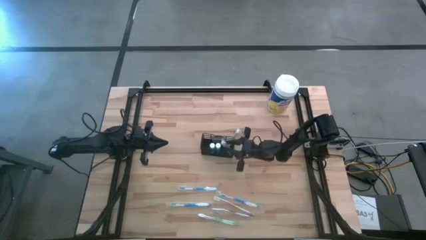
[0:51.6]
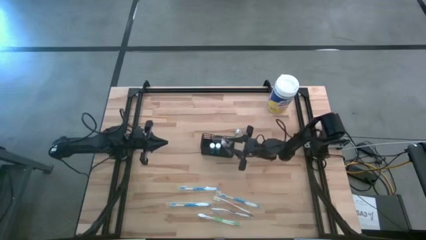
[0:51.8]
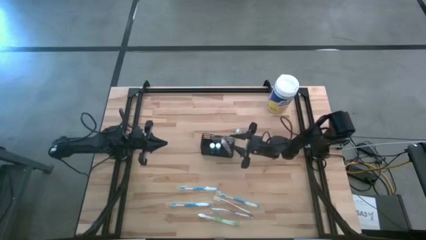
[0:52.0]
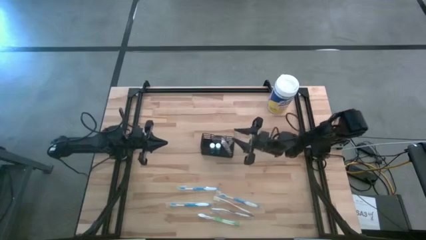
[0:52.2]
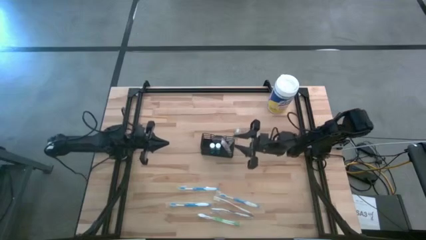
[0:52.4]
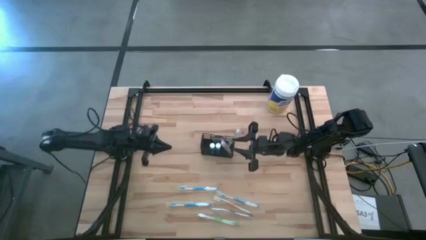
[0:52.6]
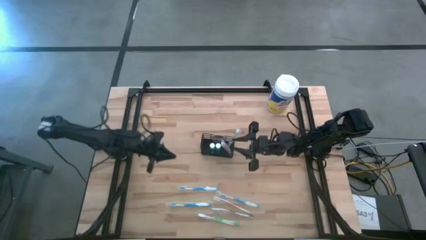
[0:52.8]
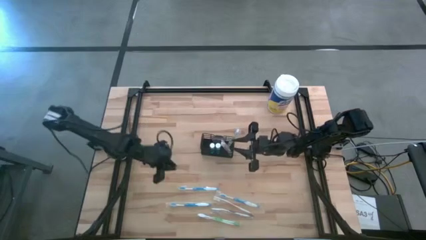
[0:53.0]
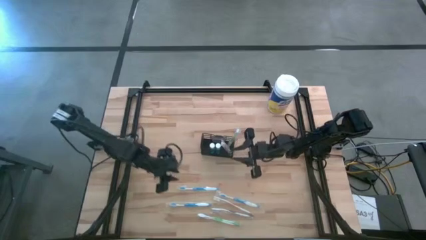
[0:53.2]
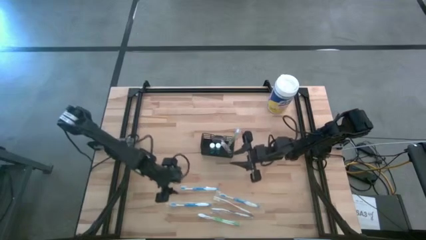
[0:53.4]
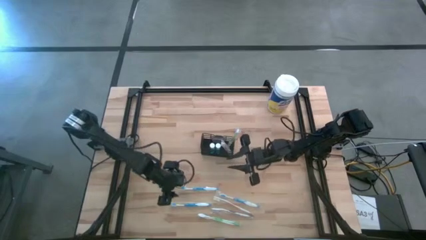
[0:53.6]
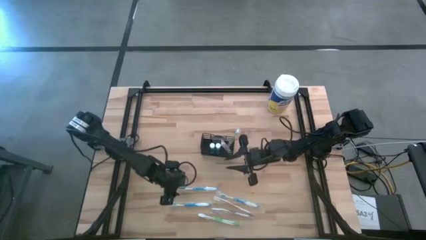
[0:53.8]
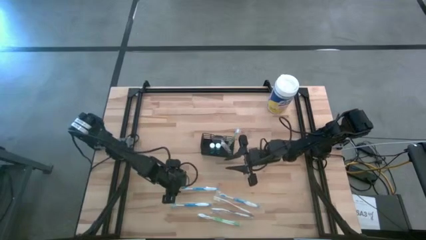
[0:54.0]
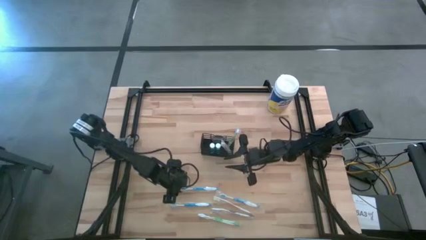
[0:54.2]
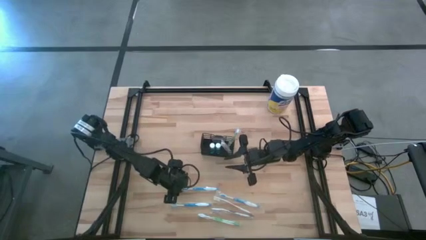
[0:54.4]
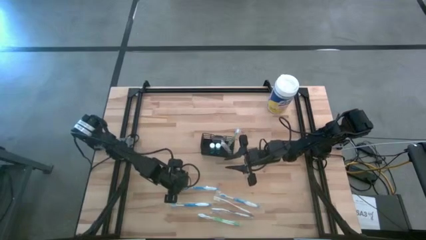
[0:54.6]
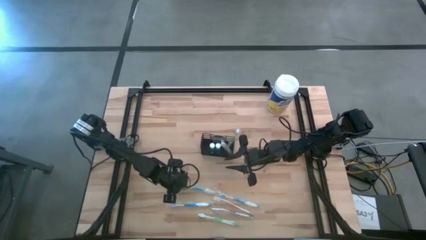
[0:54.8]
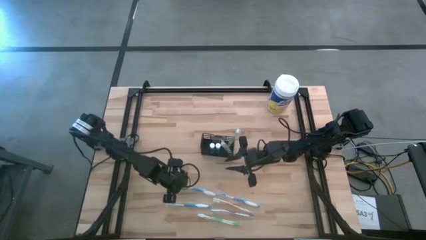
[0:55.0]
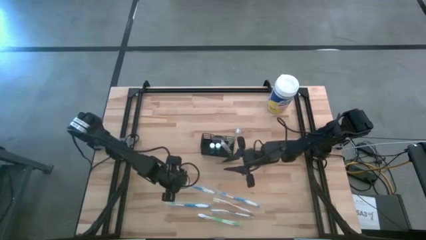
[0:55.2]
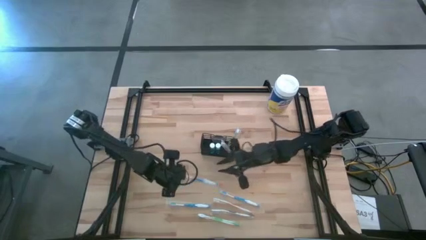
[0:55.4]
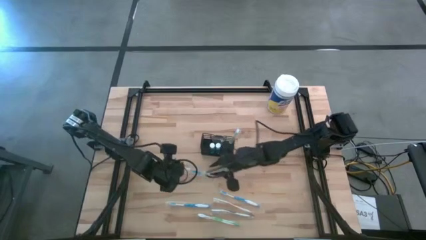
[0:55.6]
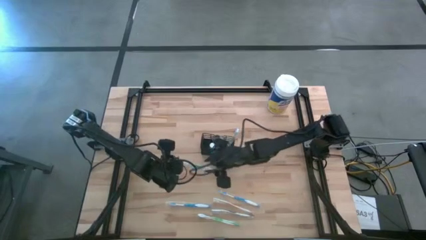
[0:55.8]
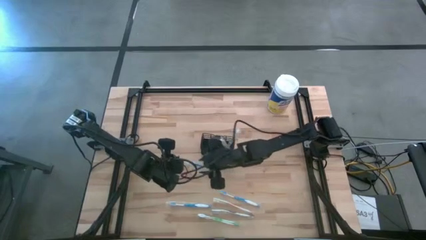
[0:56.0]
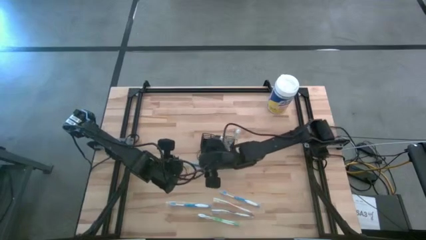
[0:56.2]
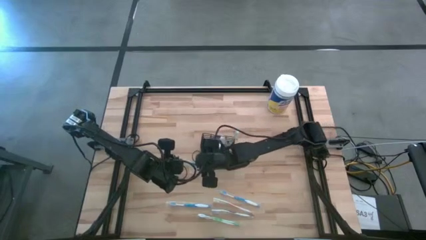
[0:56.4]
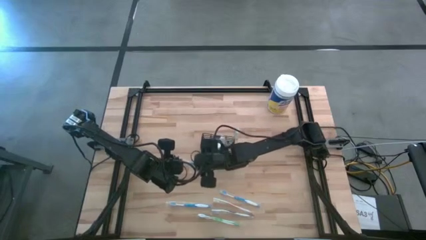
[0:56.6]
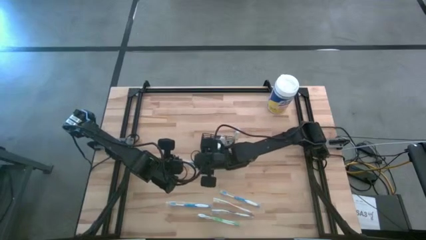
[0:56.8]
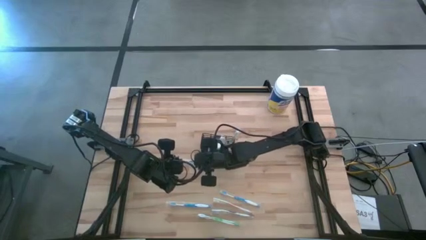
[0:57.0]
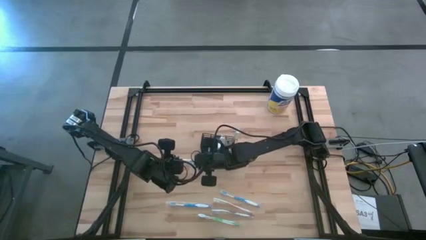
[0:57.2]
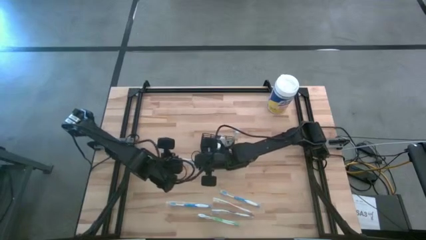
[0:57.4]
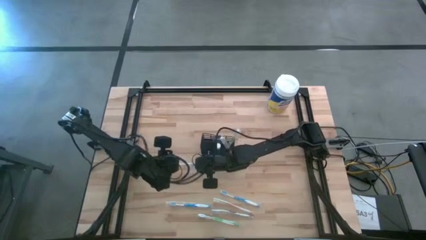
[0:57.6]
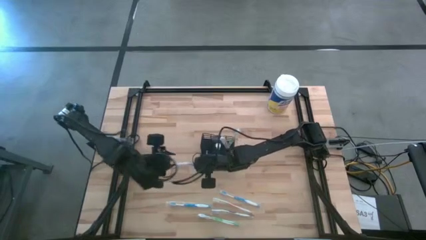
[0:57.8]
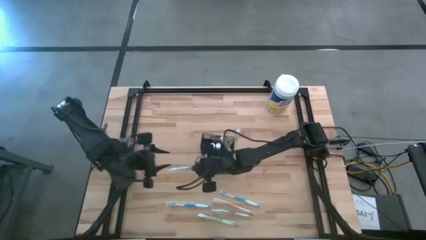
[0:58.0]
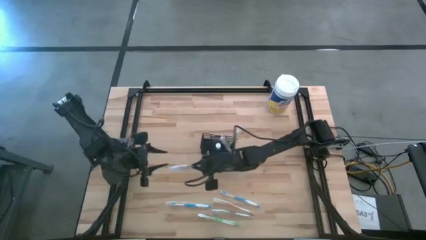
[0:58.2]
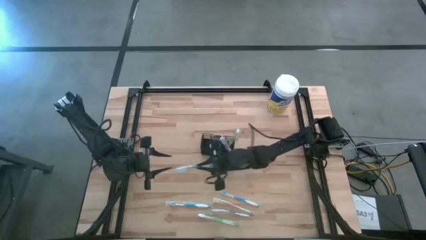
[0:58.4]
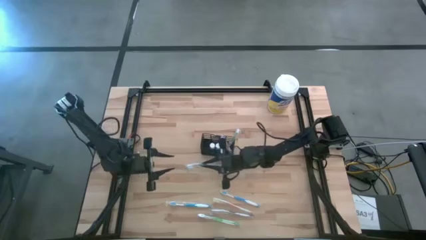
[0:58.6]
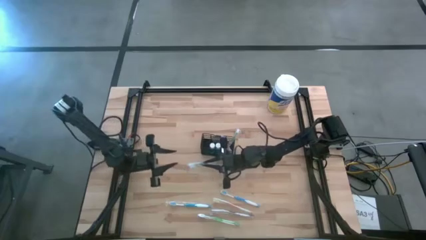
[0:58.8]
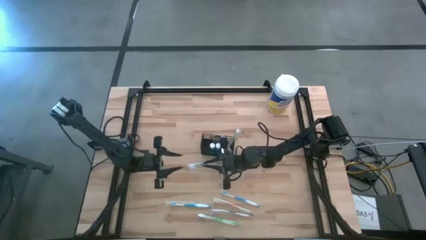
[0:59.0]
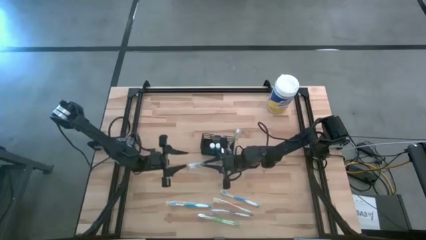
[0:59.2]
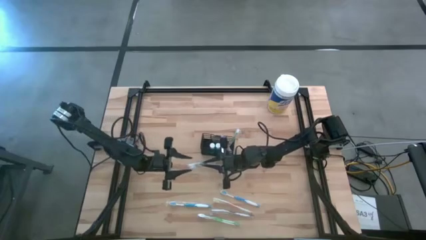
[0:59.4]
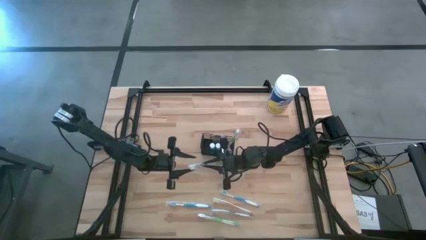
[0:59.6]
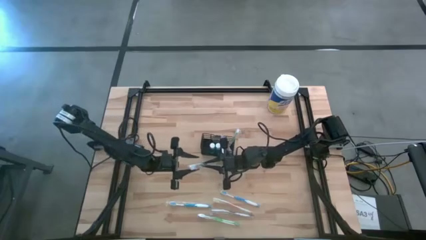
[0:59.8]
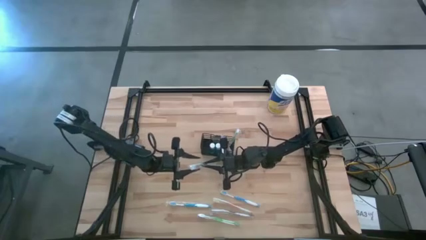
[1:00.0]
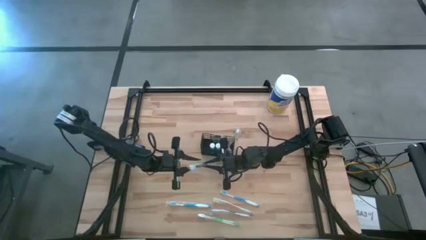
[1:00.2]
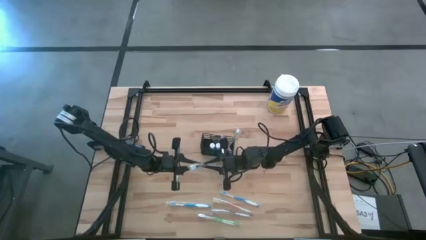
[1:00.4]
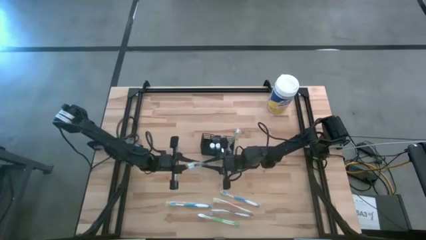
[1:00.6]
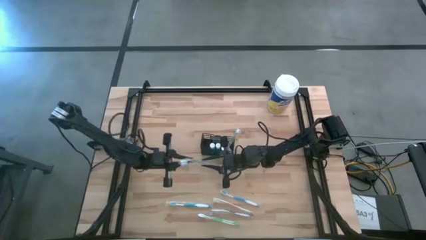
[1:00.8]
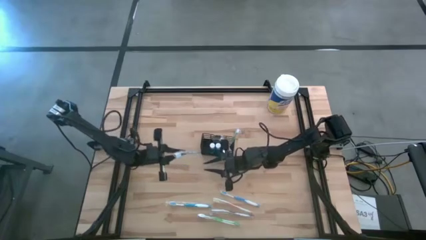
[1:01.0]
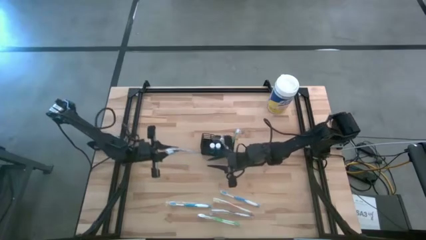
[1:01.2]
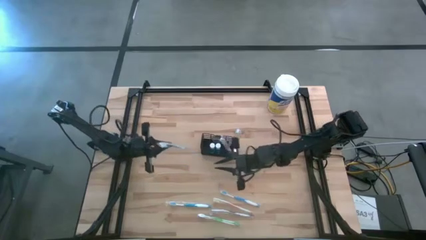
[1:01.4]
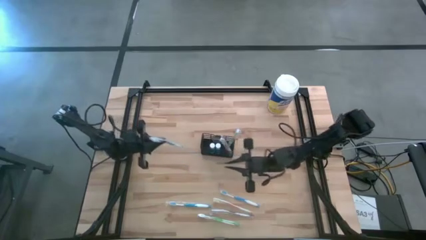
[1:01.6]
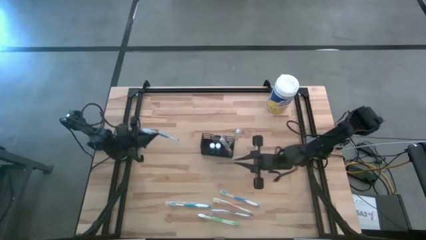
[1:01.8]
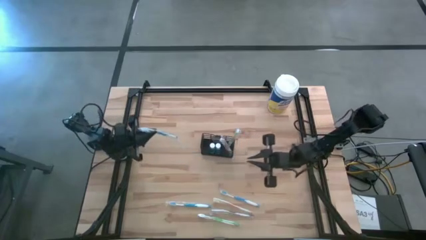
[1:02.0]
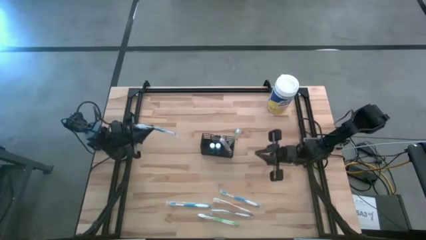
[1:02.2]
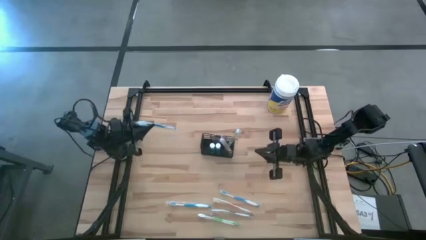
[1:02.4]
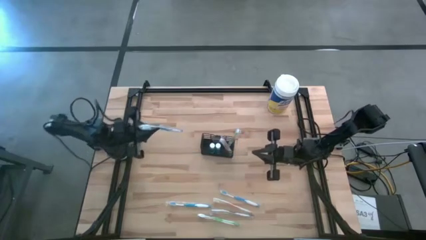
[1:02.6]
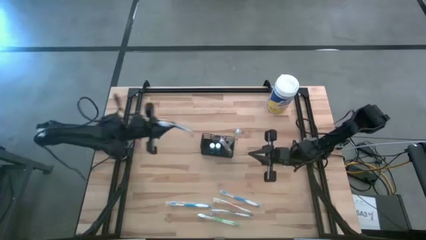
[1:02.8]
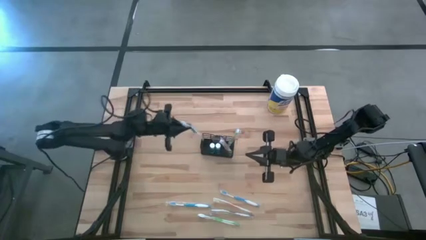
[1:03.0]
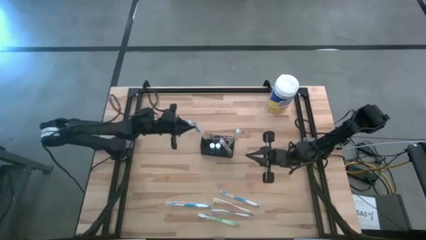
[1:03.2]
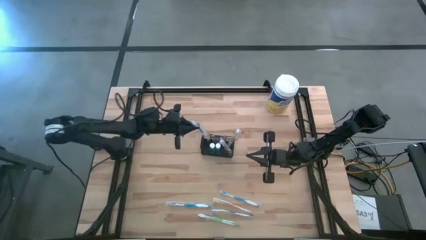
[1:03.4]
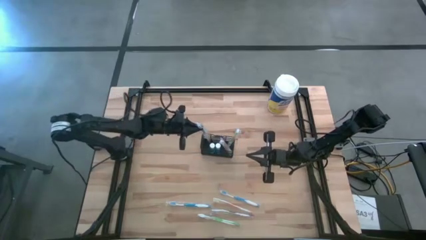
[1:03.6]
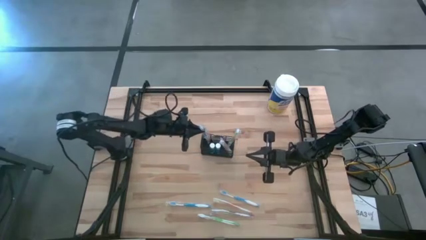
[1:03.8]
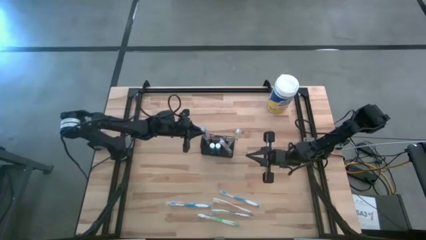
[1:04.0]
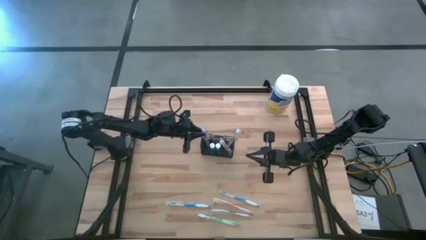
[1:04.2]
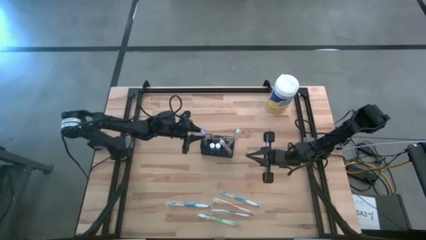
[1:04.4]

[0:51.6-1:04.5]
Task: Pick & Place toothbrushing station
Put the top left blue toothbrush into the wire organizer

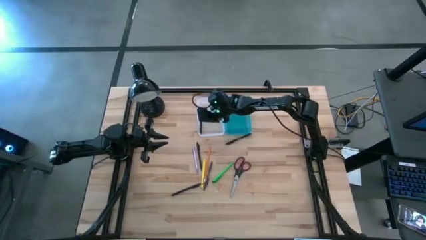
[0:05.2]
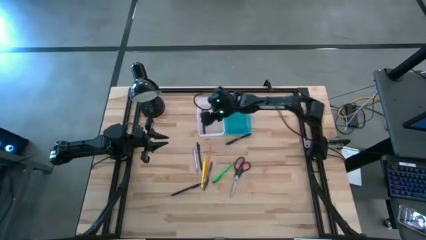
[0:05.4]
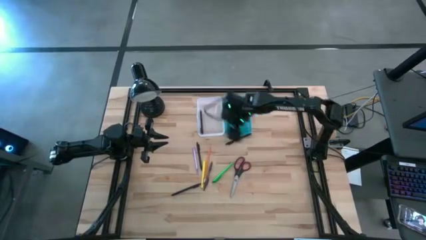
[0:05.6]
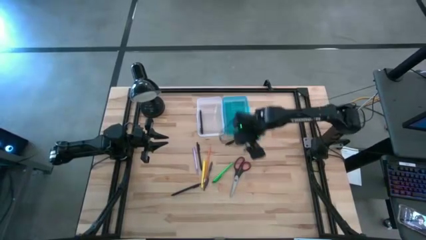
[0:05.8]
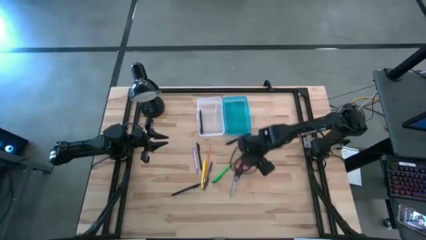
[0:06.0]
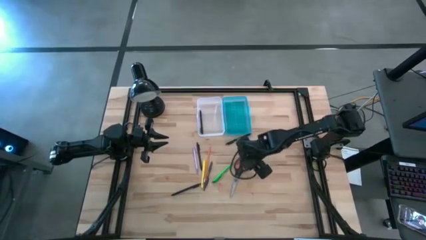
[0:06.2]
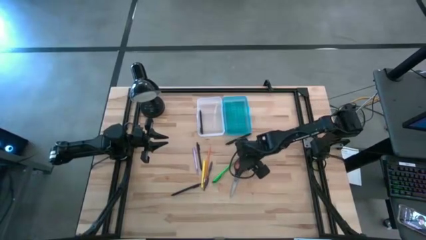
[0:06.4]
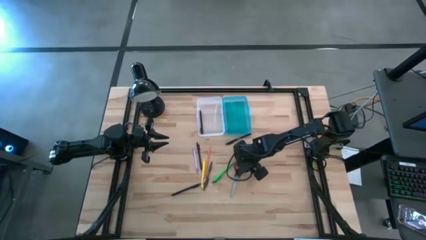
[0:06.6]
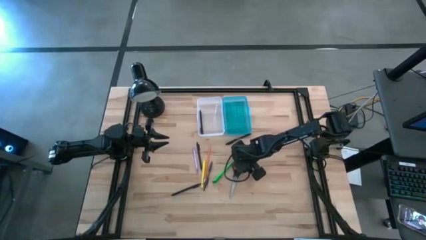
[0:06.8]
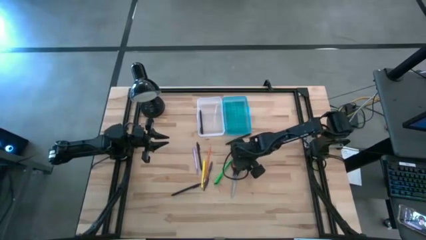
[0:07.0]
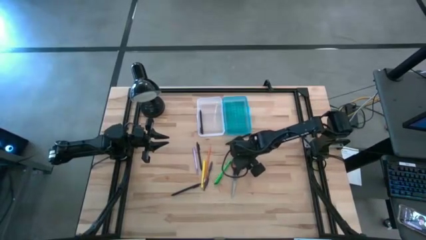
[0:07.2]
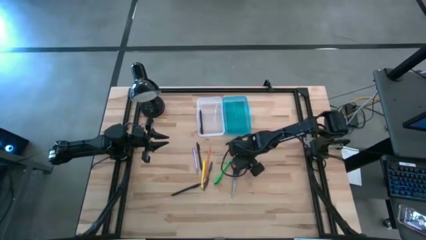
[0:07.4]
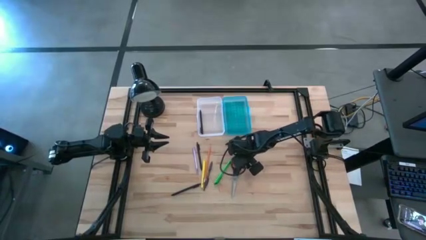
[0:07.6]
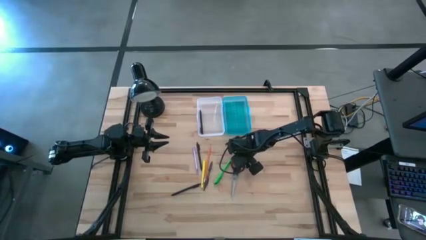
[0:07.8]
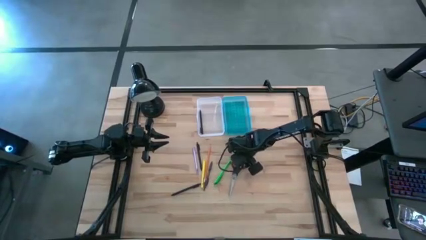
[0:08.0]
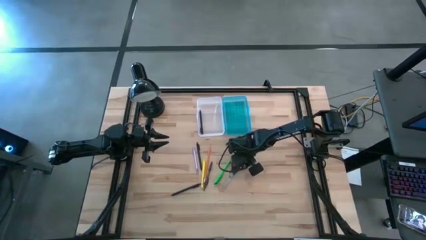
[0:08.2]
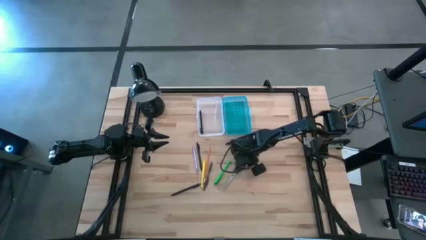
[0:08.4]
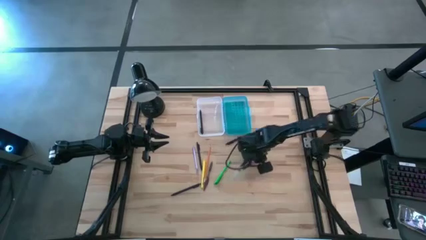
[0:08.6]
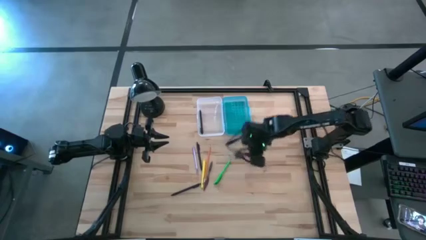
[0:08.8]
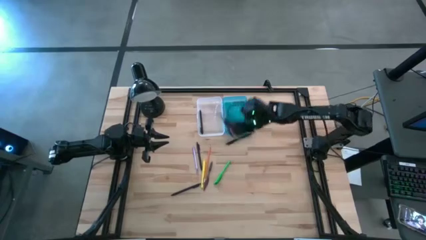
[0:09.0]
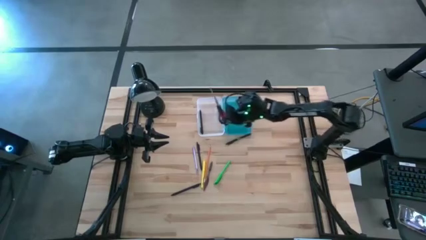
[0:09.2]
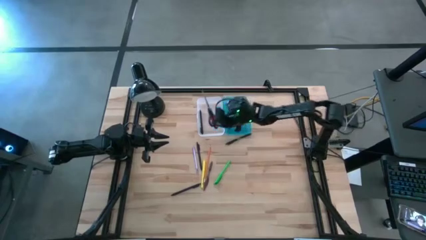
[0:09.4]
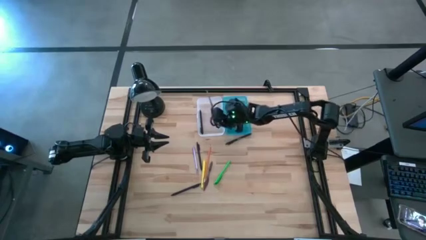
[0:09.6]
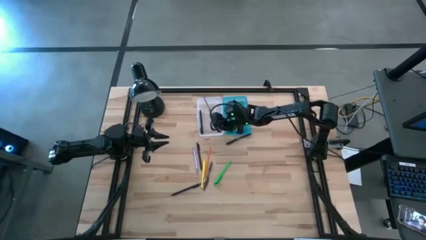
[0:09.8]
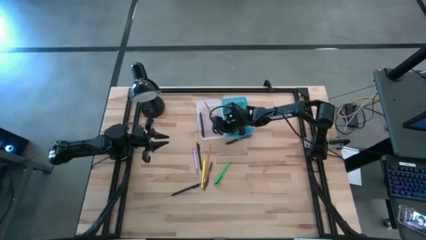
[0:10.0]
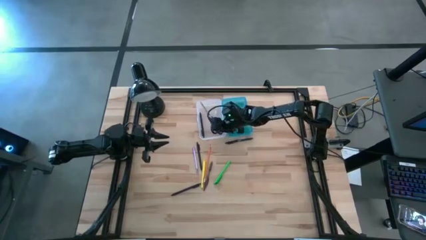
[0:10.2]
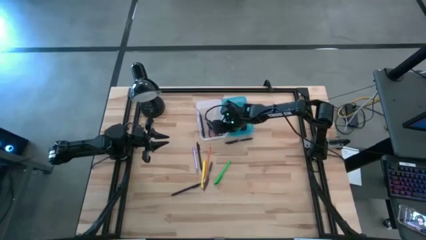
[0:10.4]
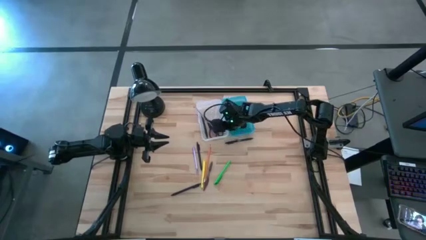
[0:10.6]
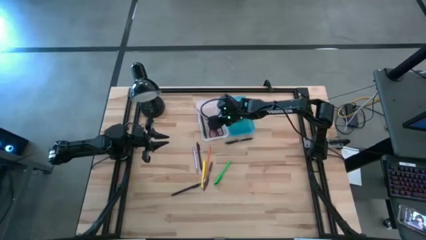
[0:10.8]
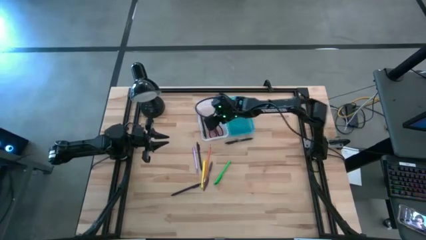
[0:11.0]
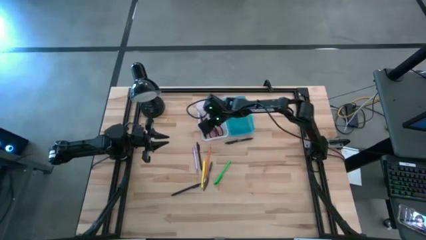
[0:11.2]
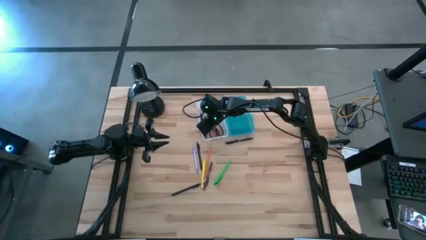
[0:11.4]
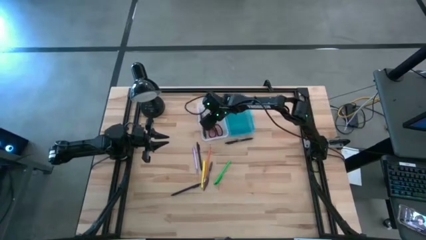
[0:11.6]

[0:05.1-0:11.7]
Task: Pick & place school supplies into a supply box
Put the black scissors into the blue supply box
